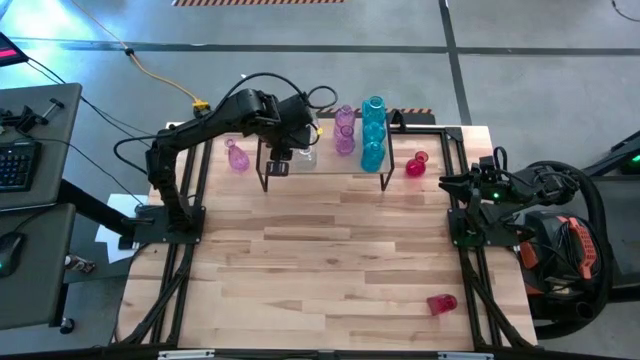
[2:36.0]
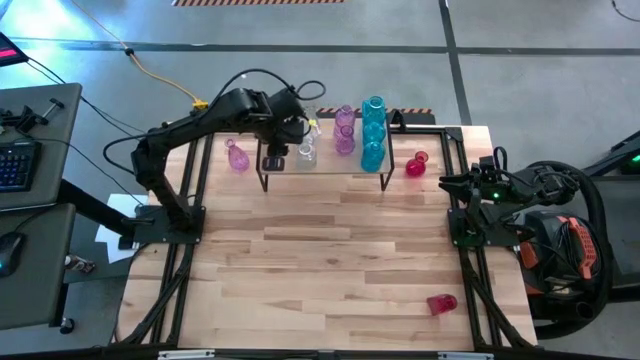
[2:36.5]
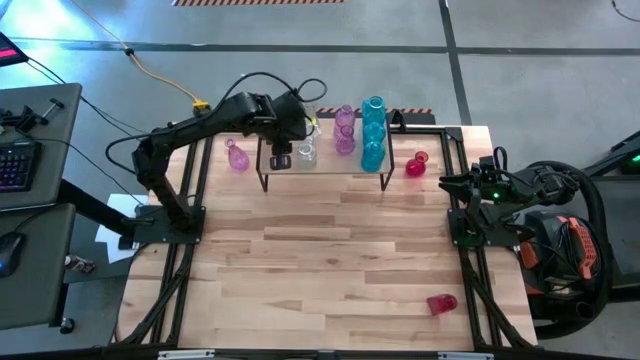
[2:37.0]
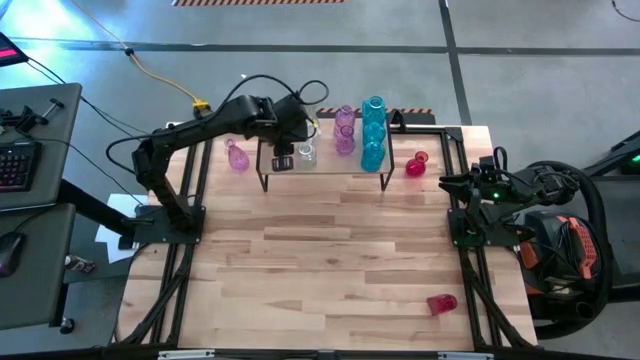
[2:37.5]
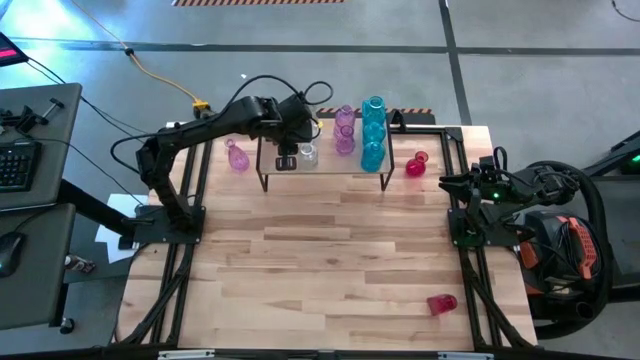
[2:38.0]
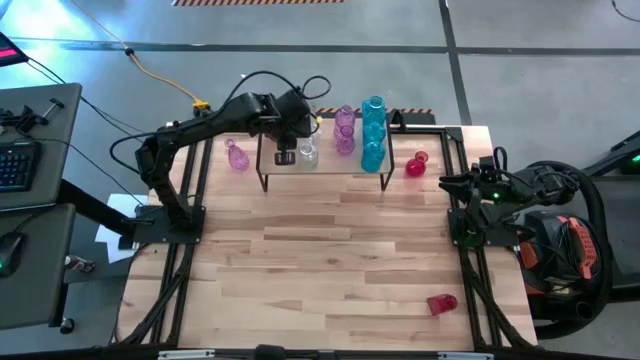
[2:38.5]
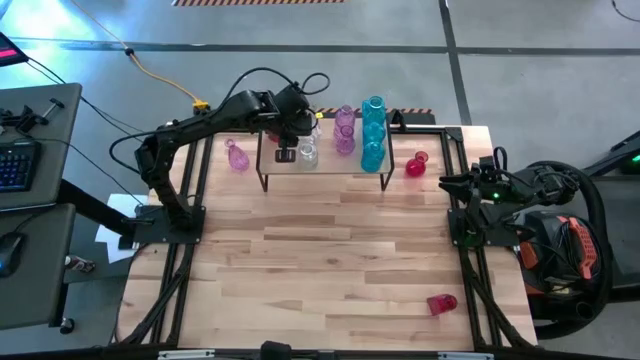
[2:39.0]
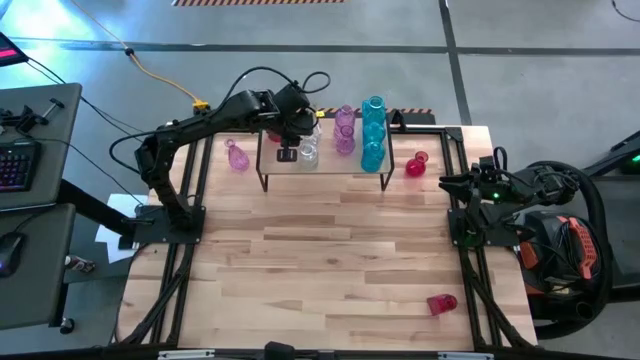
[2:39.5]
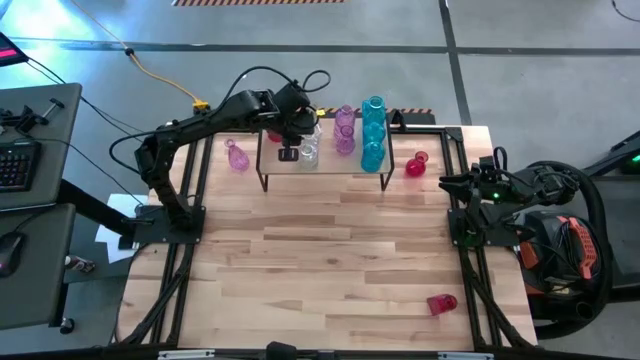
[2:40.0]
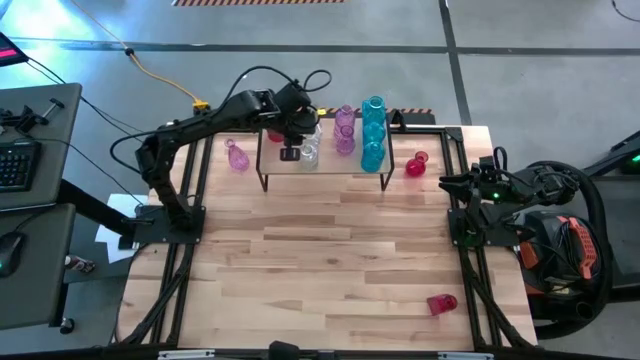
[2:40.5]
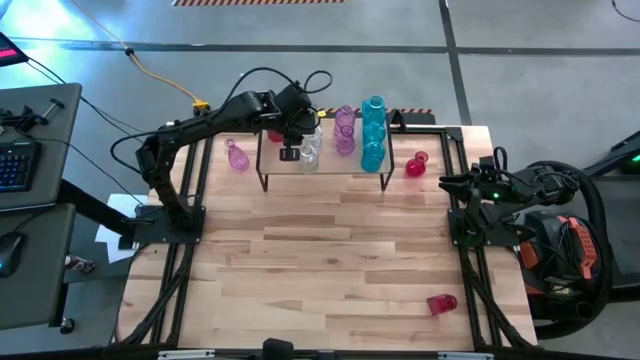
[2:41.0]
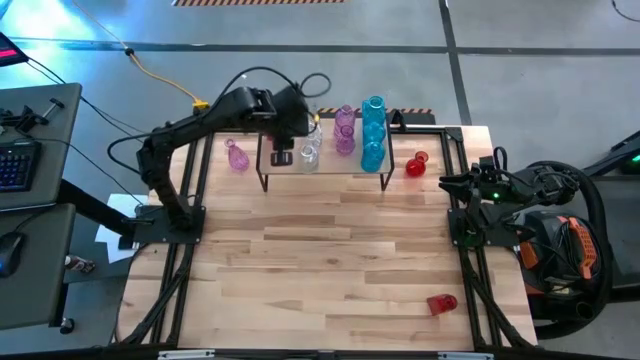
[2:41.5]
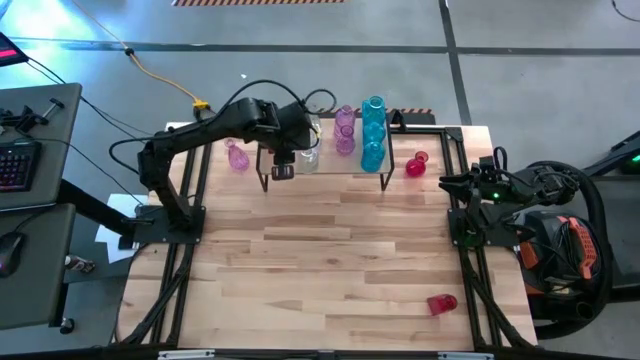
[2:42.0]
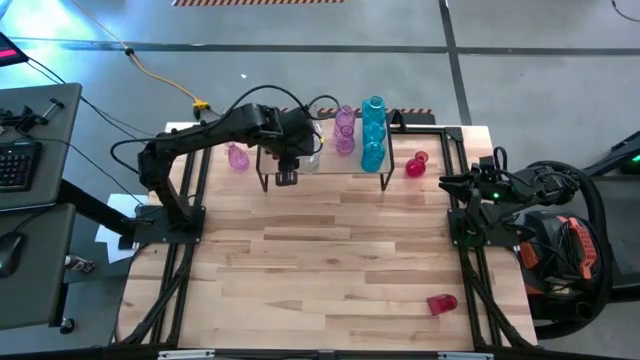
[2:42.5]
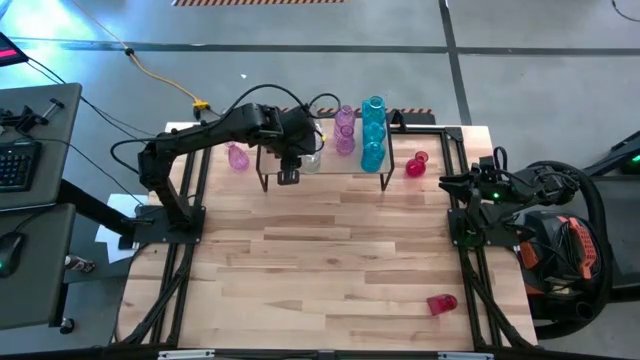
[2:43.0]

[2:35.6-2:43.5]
Task: sort vases onto shelf
Adjust the transparent vases on the shelf

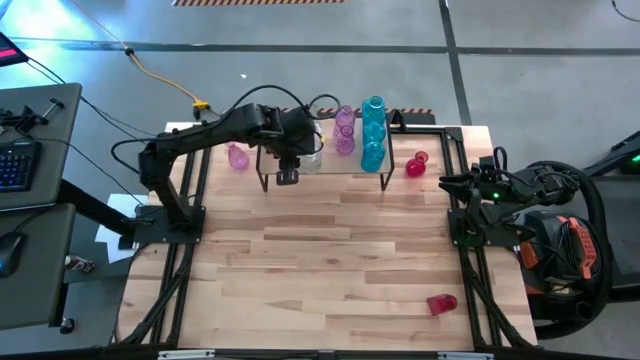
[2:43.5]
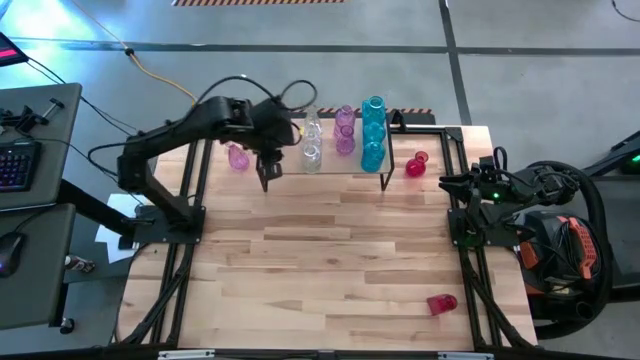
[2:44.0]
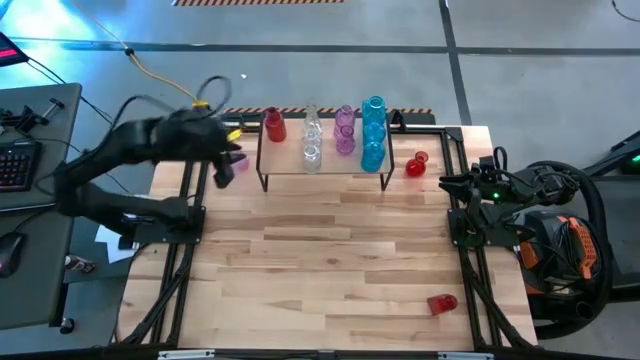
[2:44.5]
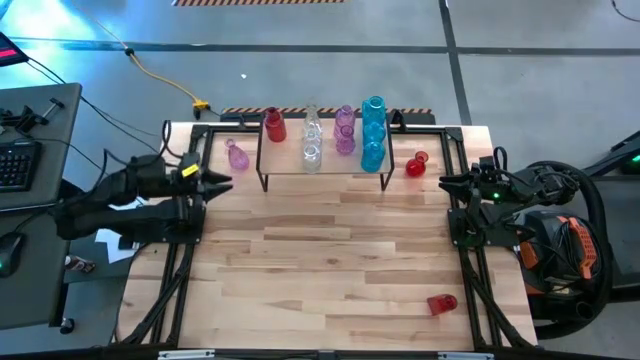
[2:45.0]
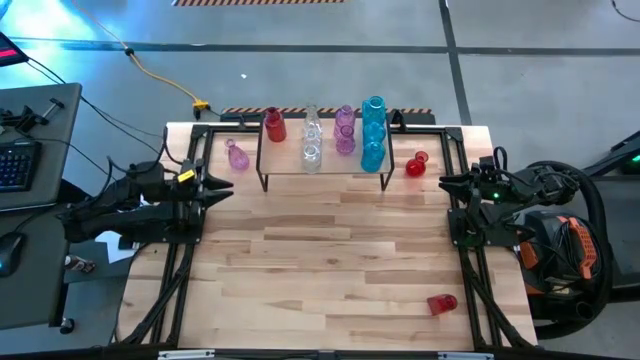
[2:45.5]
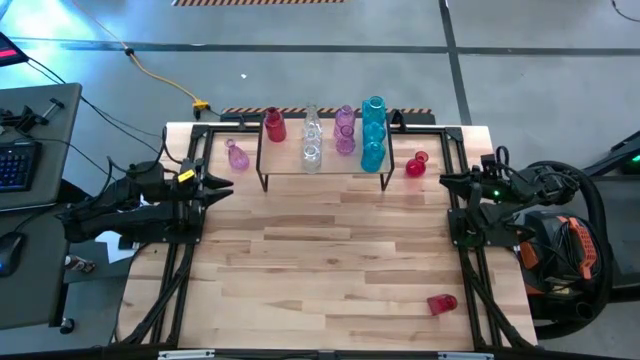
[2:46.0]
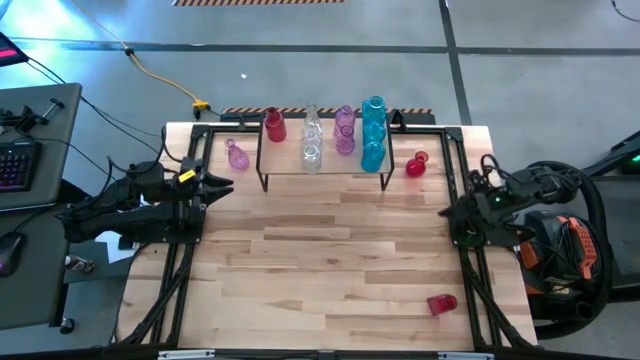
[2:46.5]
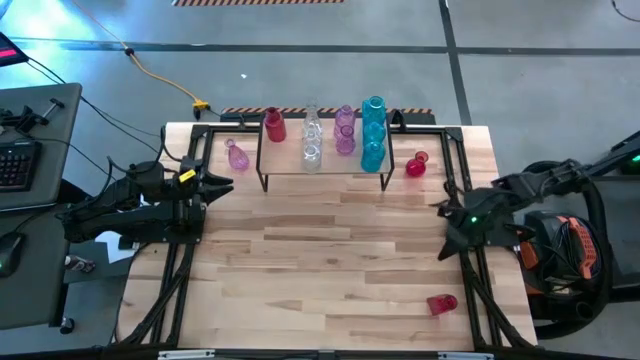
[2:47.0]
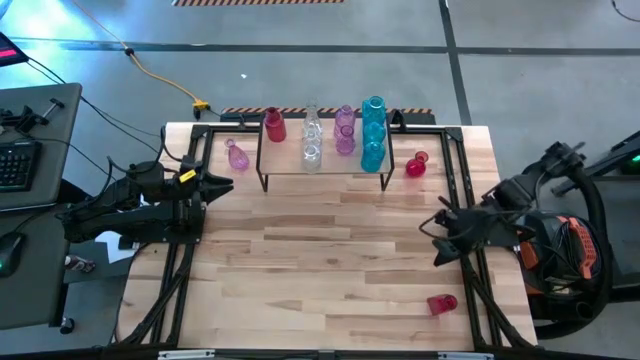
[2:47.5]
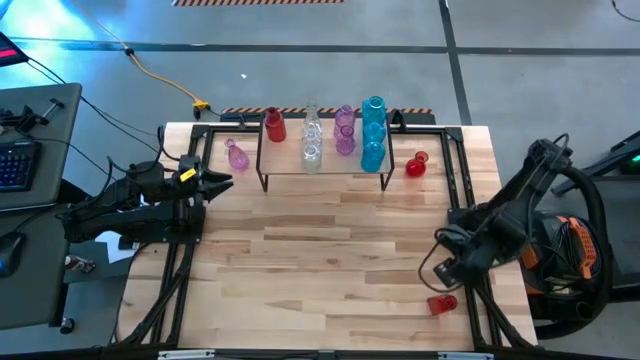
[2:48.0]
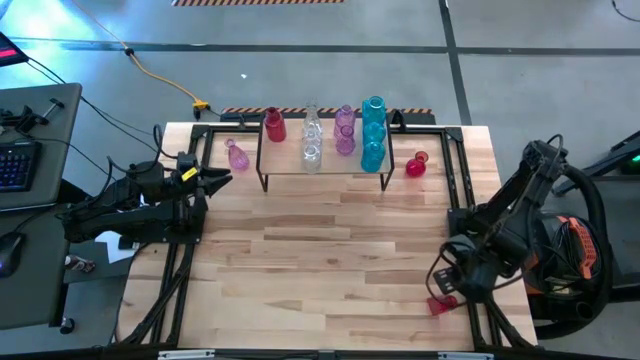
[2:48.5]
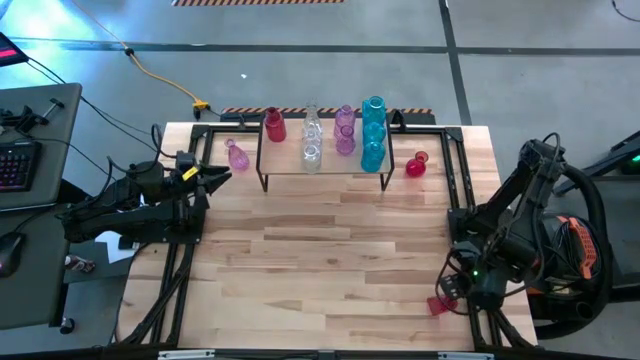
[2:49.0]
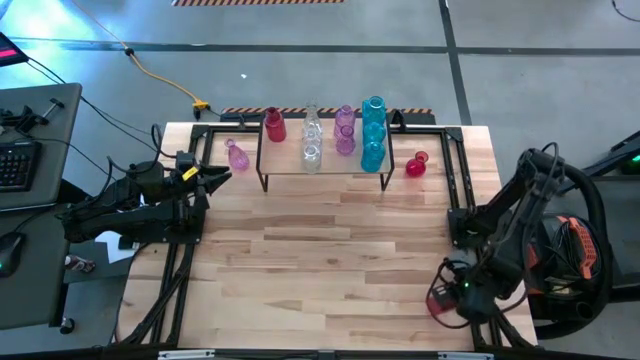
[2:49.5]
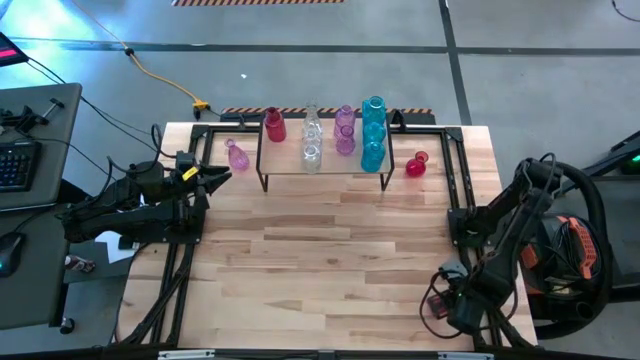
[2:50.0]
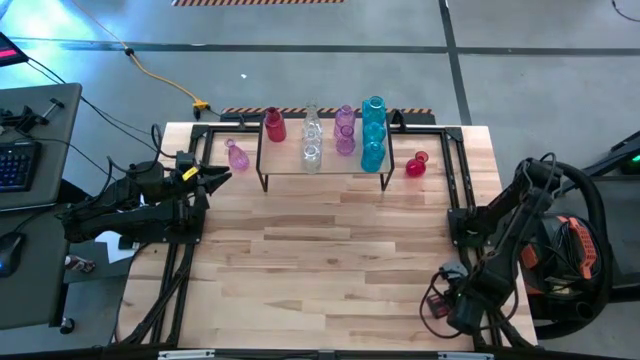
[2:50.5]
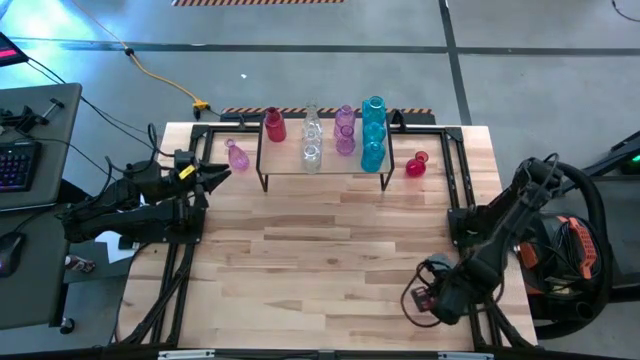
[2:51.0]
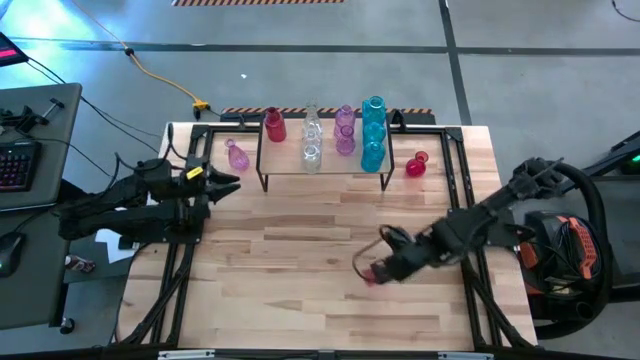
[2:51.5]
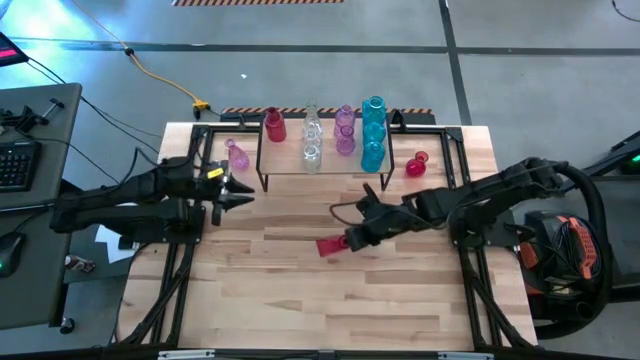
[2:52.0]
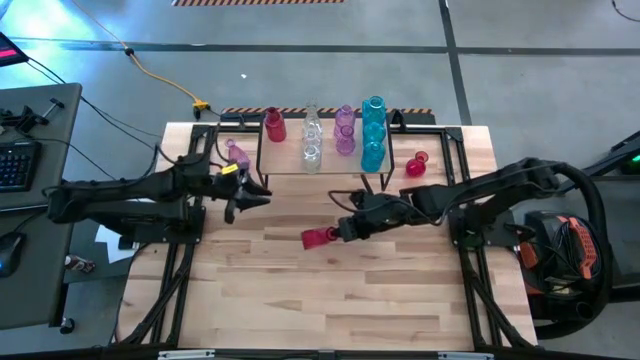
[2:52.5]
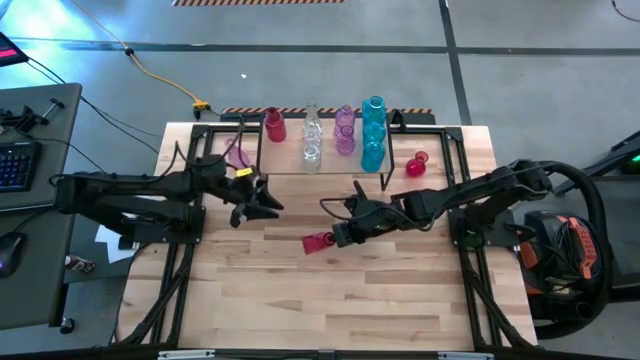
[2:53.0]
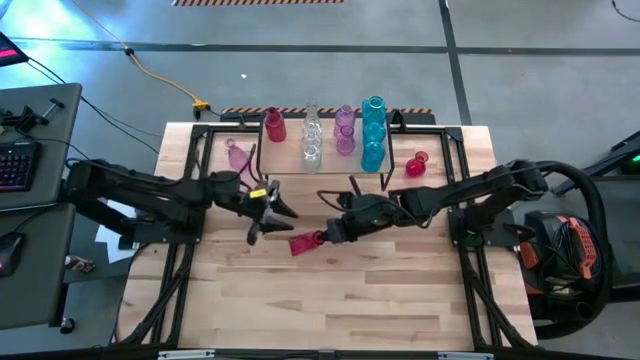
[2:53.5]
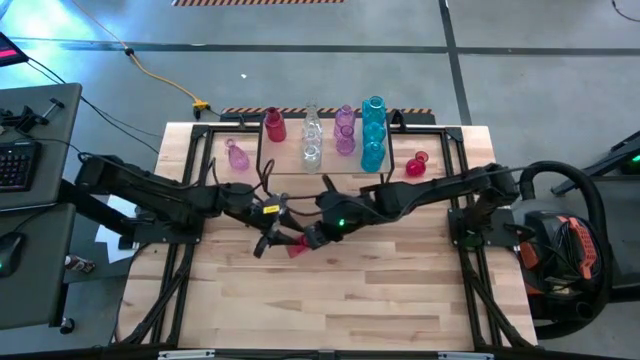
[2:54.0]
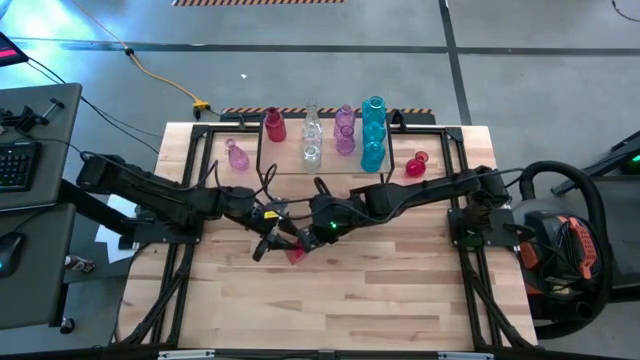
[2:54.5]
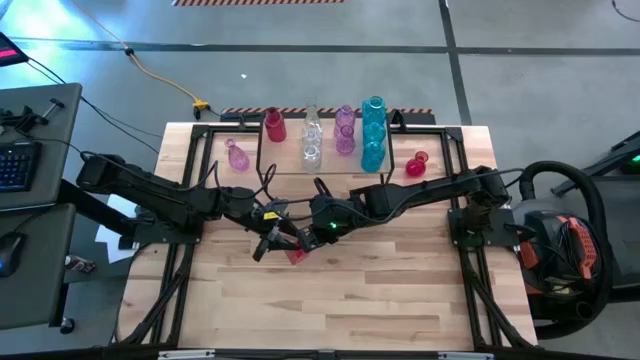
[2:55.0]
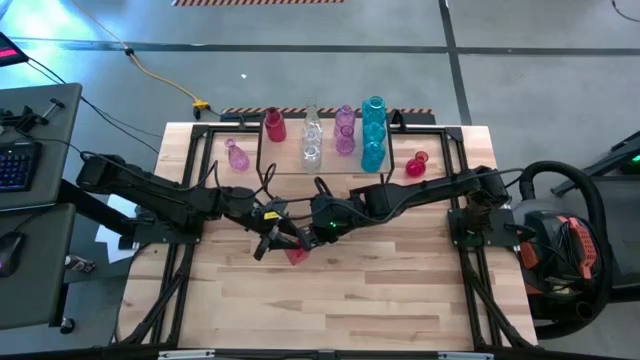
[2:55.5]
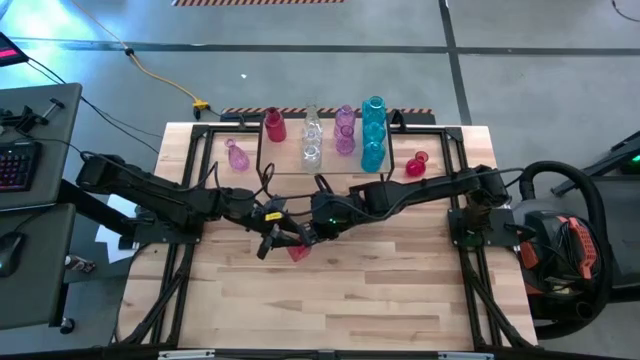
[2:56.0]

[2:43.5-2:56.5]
Put the bottom red vase on the shelf aligned with the other red vase

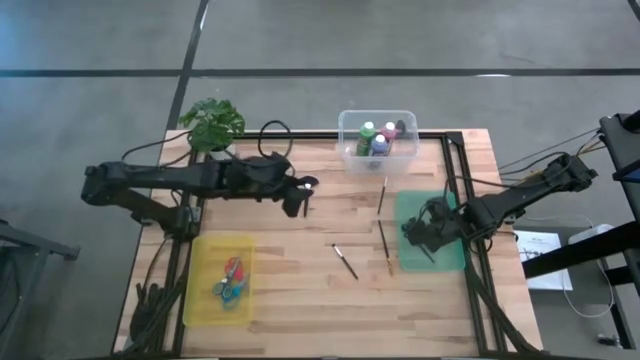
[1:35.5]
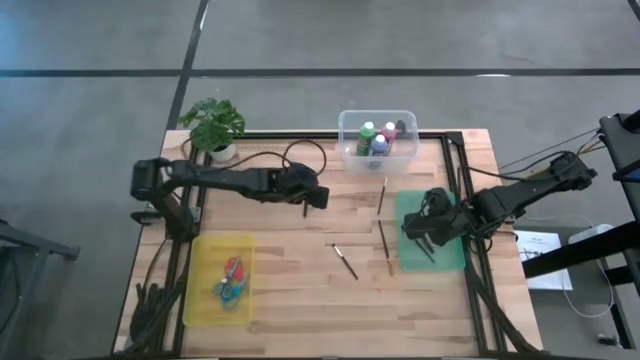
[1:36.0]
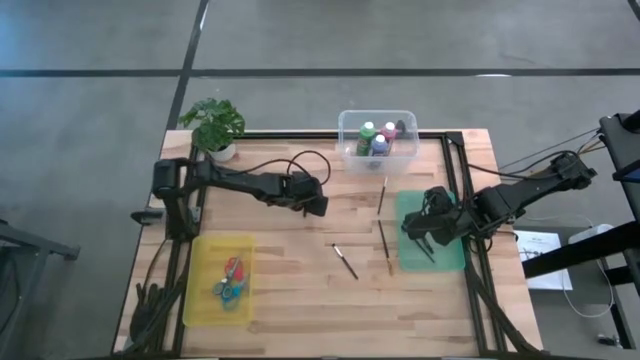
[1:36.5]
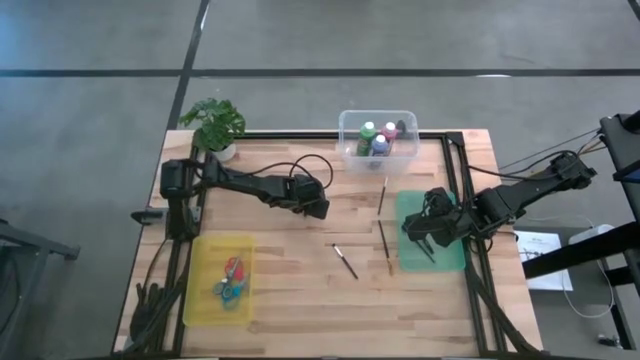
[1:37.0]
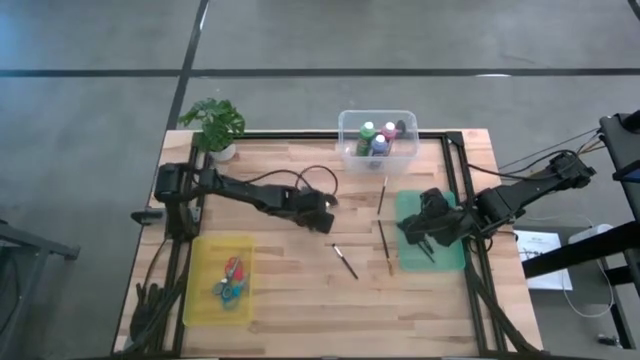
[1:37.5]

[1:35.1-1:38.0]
Task: Pick & Place Paint Supplies
Put the black highlighter brush into the green bin
